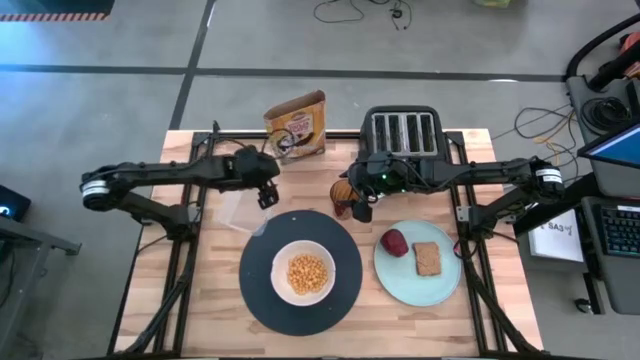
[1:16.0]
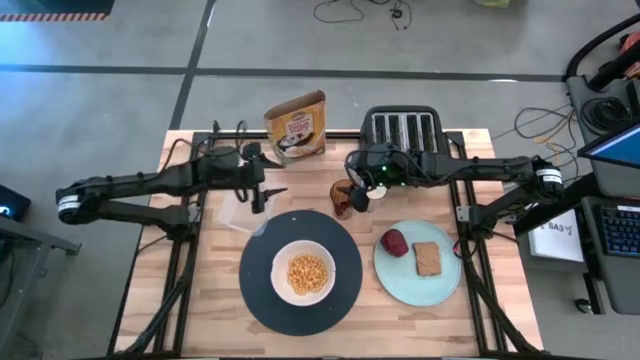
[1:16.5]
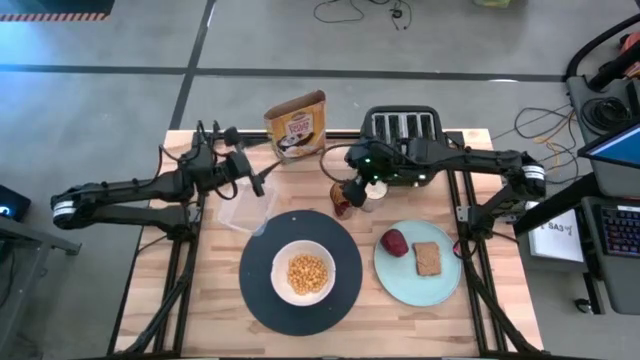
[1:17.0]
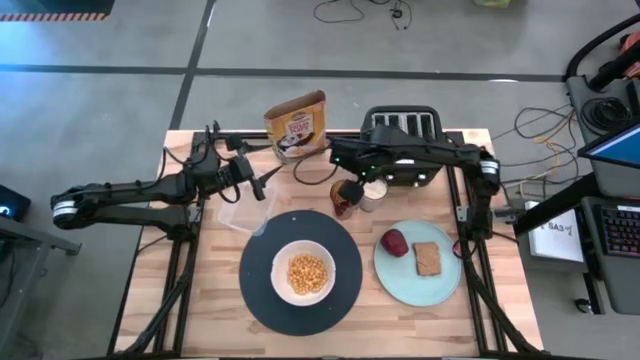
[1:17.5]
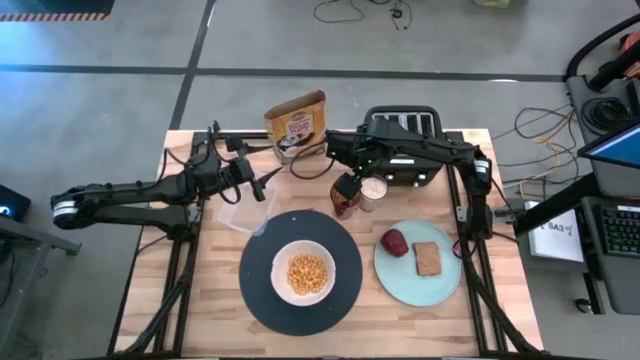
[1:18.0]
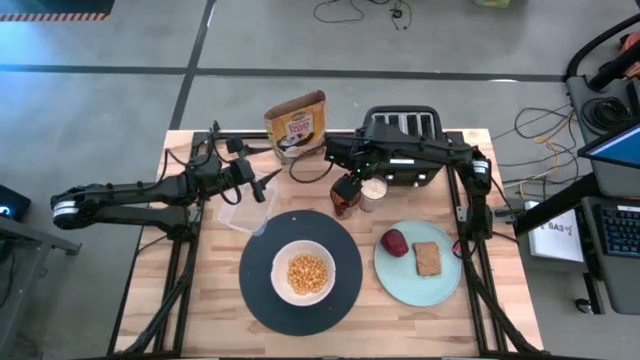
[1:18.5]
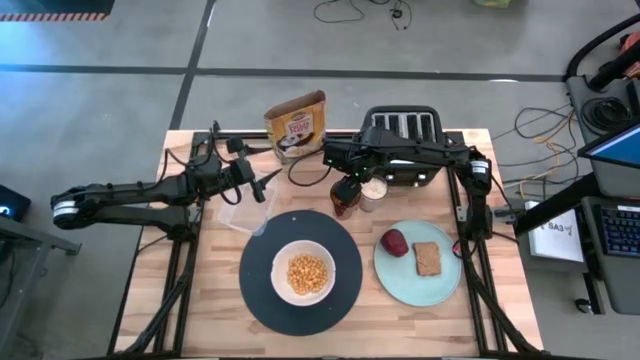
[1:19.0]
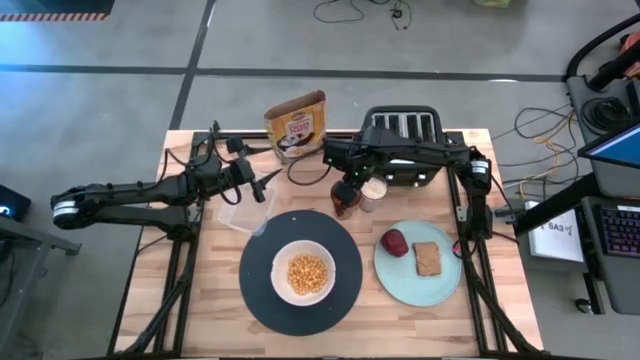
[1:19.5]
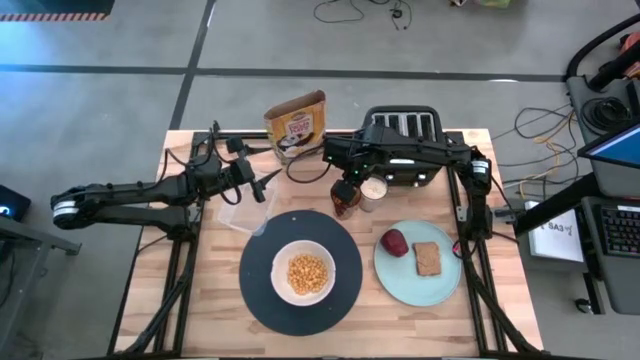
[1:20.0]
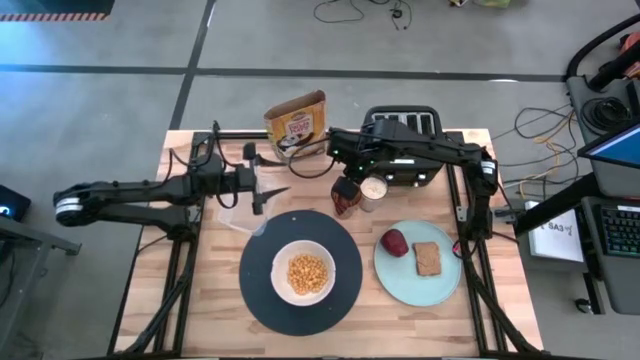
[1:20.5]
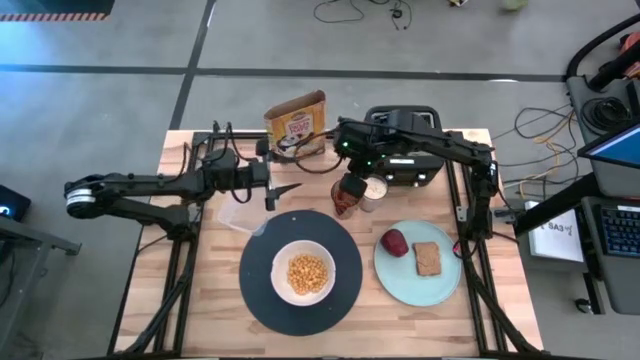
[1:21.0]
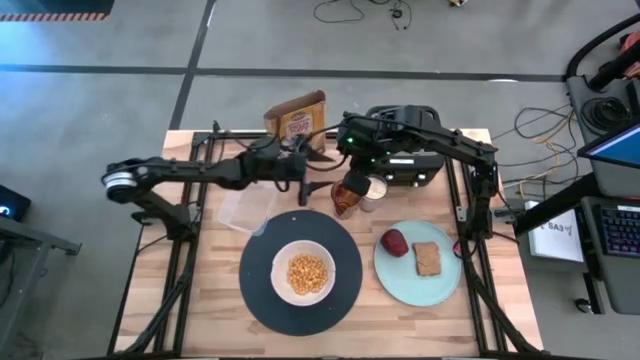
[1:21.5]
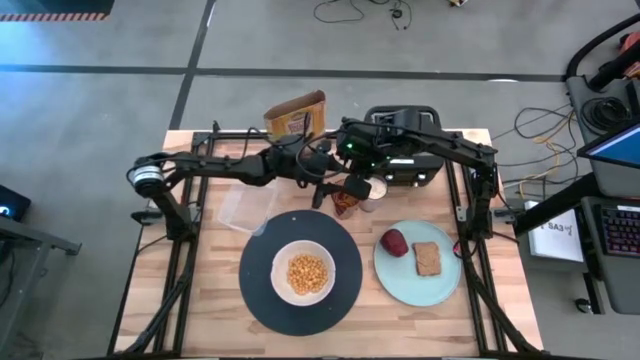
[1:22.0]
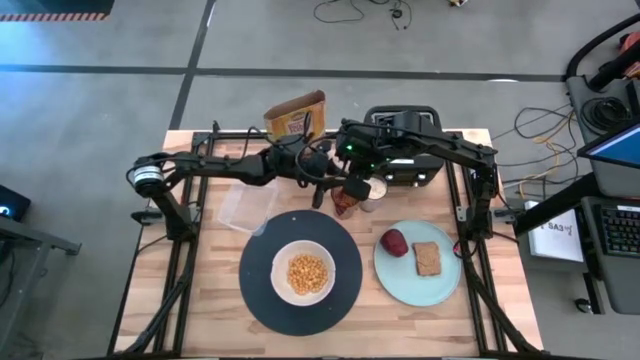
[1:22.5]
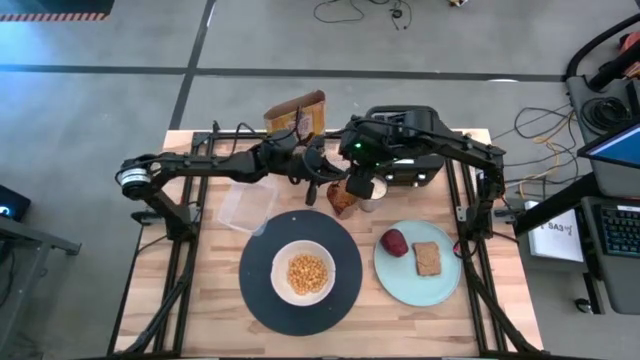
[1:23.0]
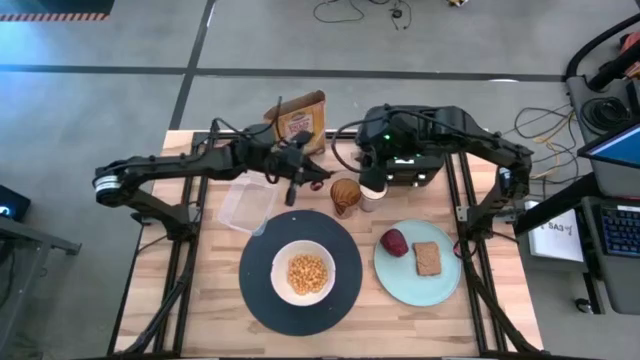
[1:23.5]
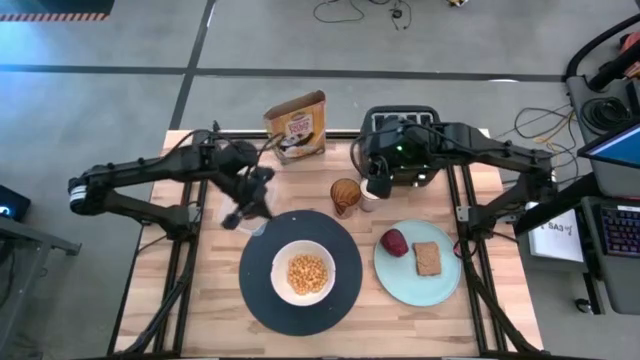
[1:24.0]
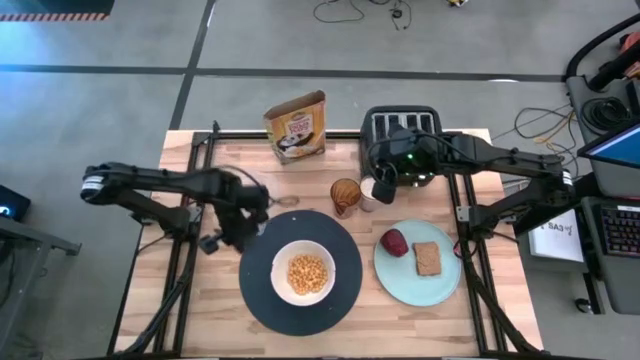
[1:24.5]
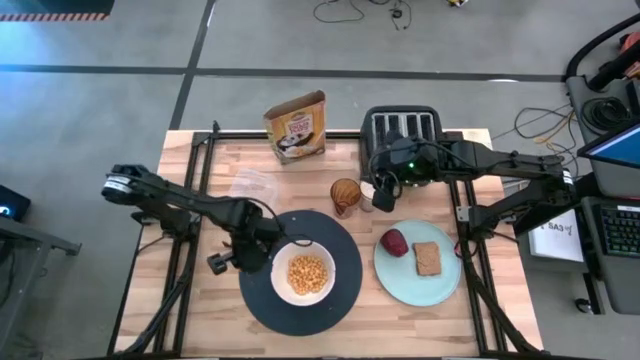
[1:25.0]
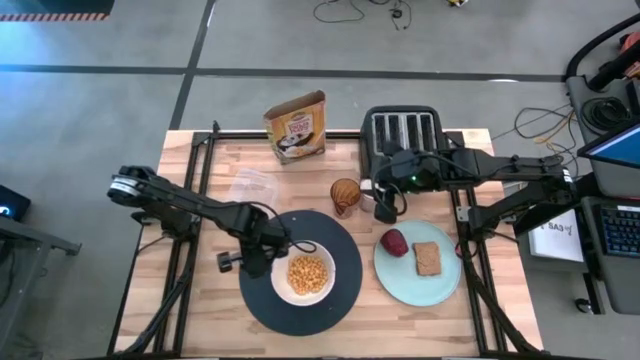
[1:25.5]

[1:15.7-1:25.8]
Task: Arrange a breakfast setting
Put the blue spoon on the blue mat to the left of the white bowl

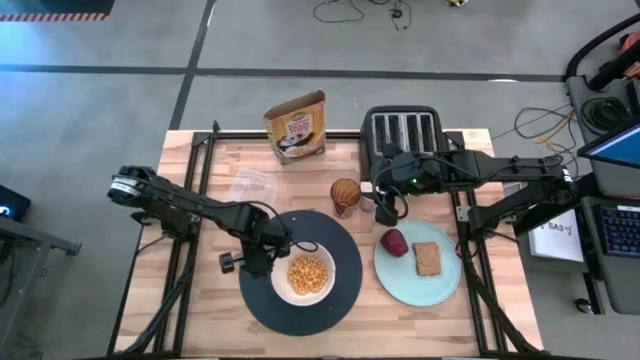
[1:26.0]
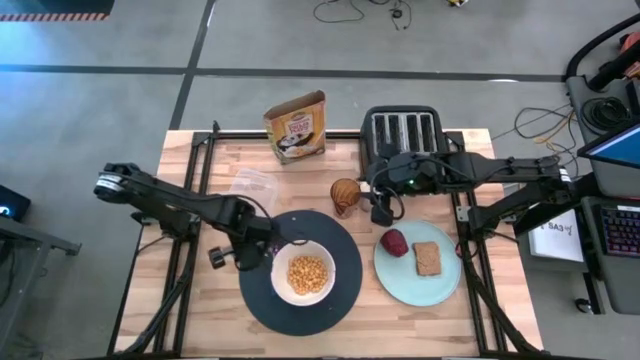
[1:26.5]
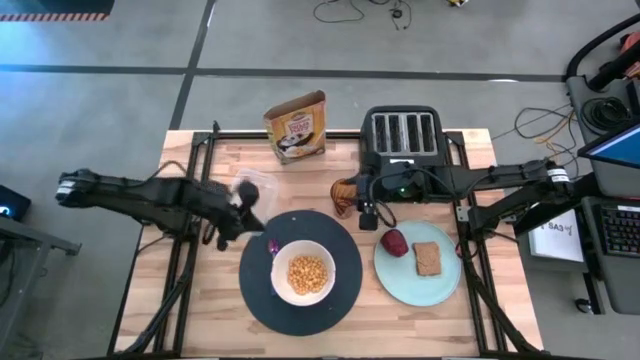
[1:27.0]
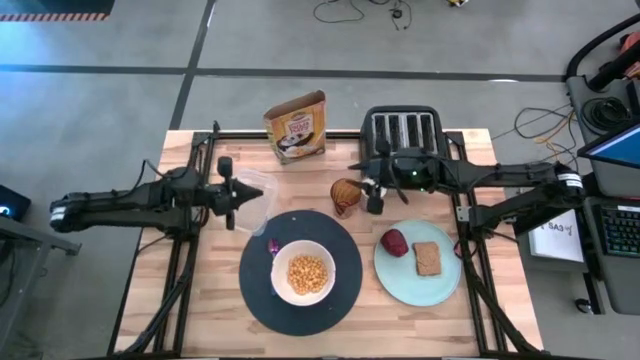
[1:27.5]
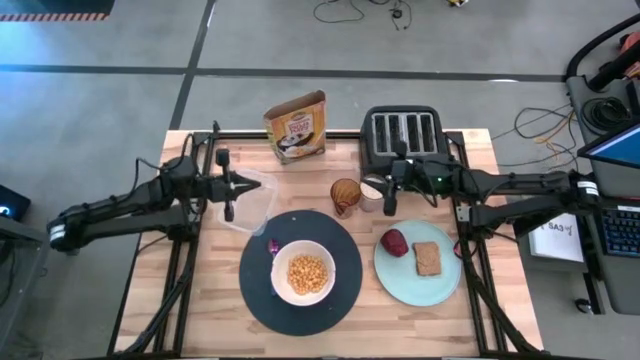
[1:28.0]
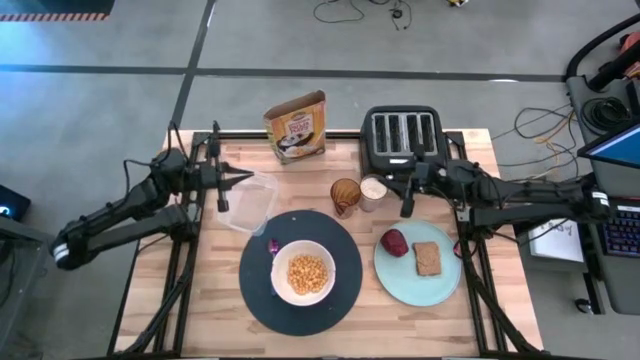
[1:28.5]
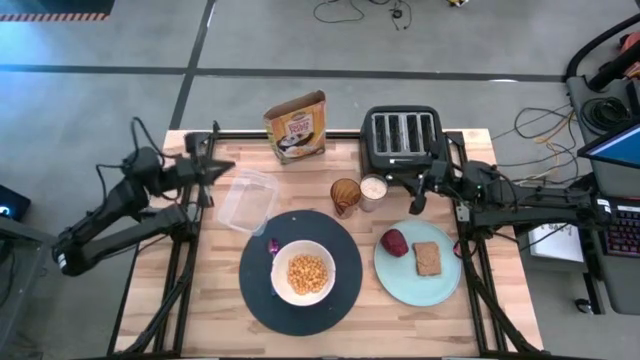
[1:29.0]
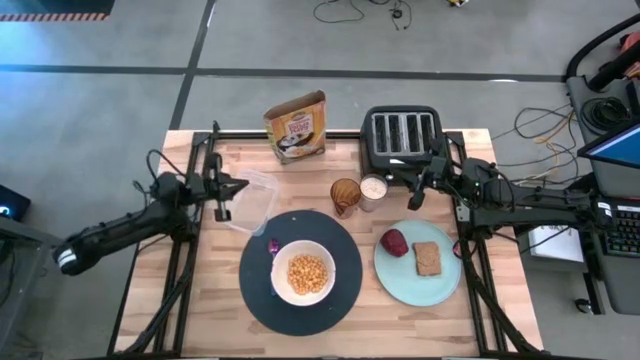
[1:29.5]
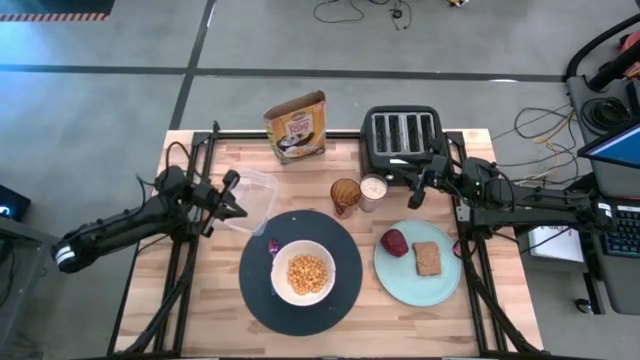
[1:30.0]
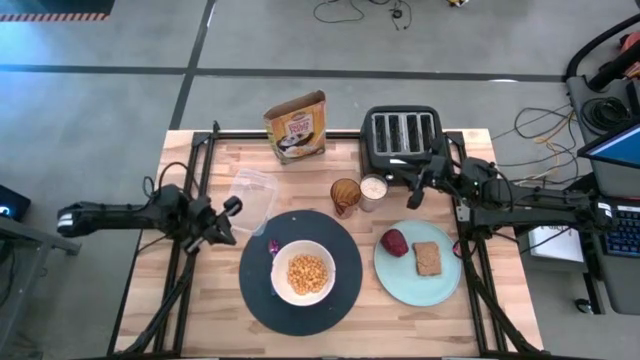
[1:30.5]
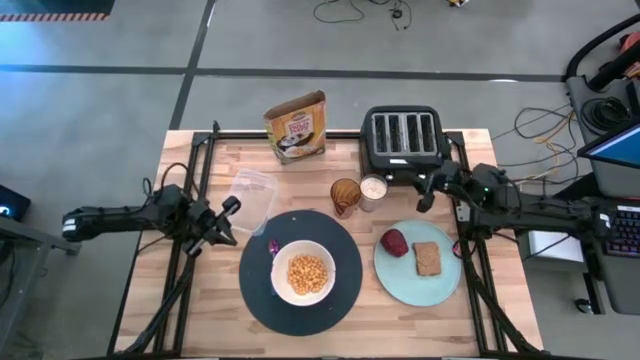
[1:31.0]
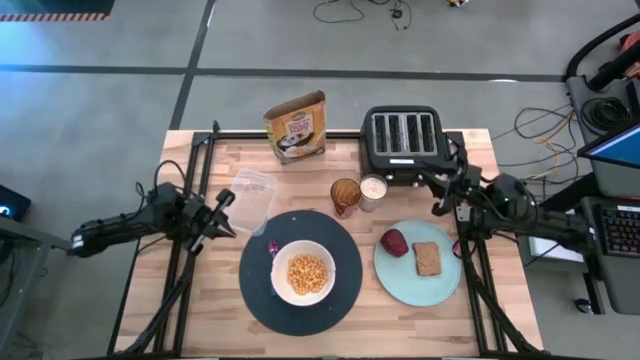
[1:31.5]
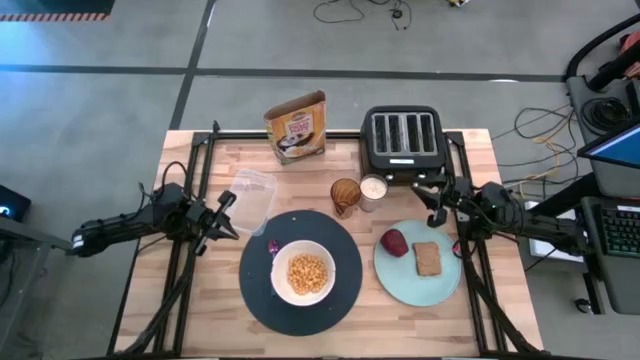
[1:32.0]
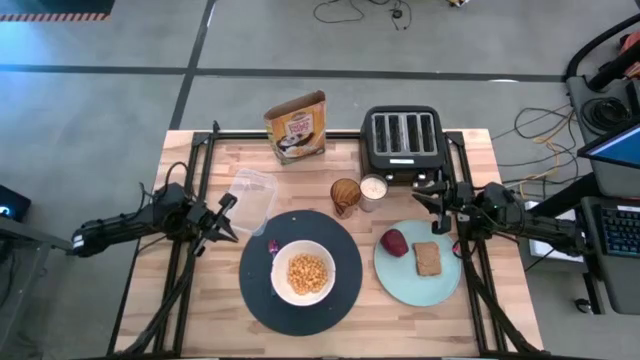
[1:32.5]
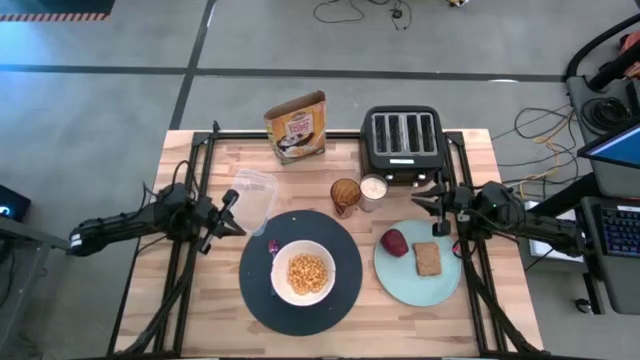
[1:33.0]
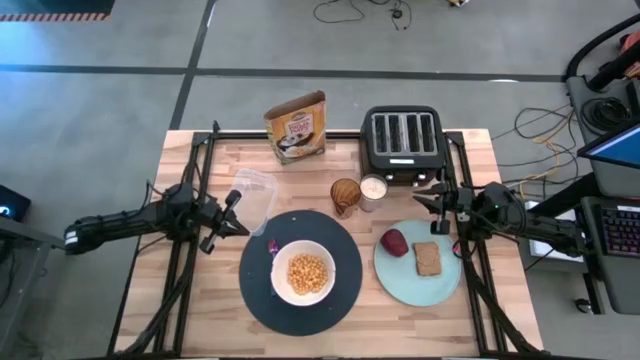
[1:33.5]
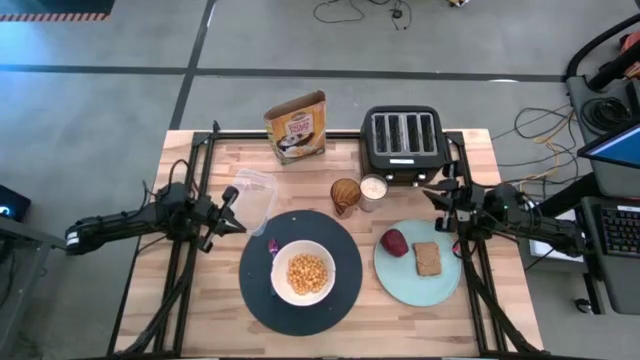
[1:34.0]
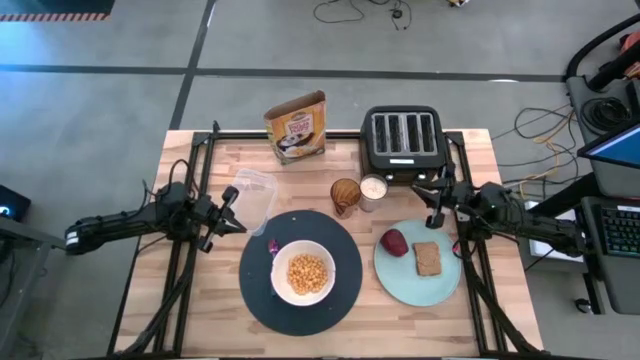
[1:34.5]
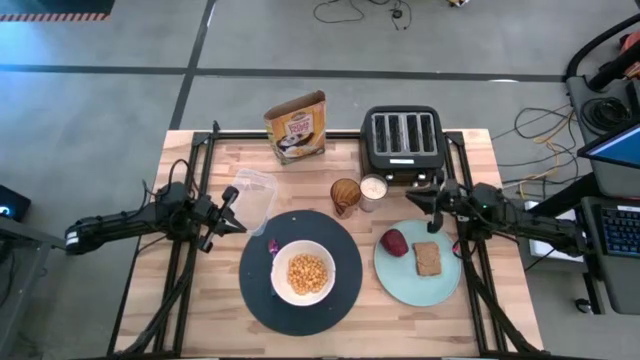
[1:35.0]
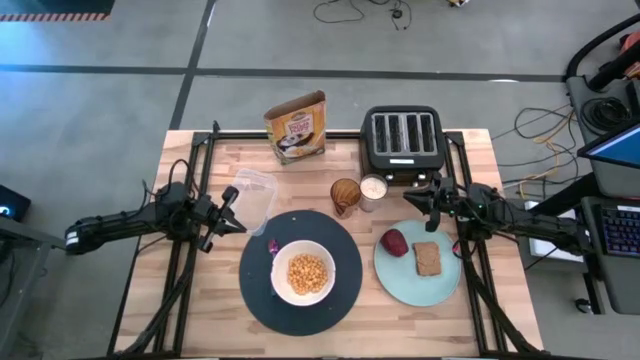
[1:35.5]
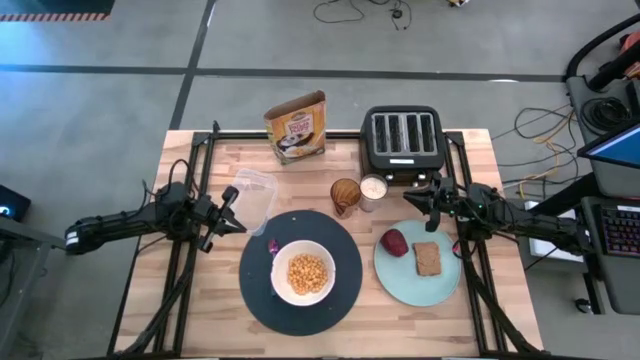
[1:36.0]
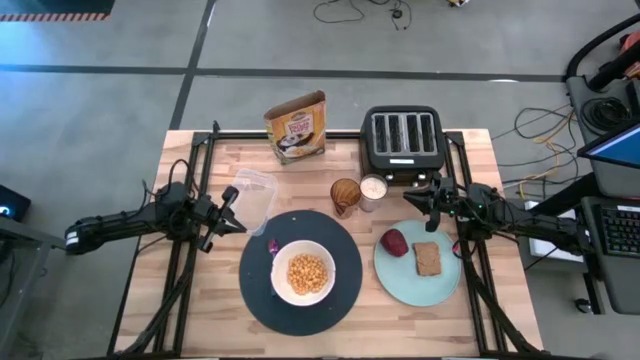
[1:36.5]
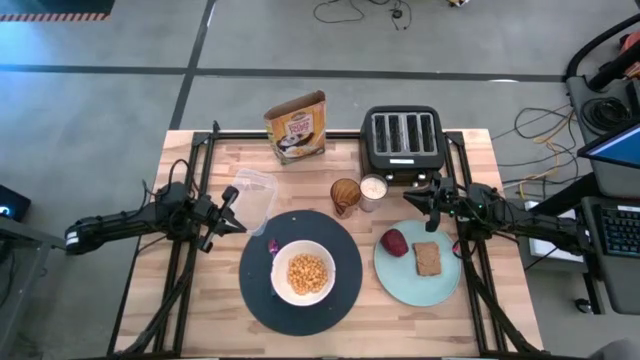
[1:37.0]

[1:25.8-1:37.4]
Return to Home Position
